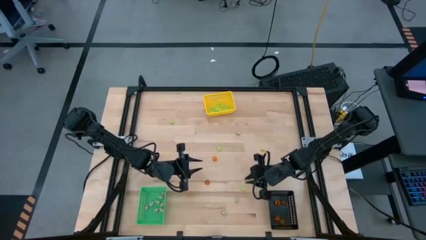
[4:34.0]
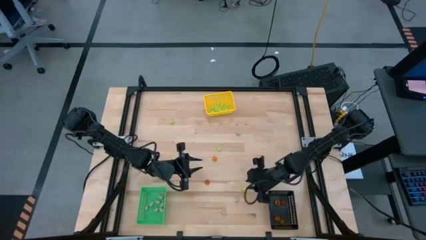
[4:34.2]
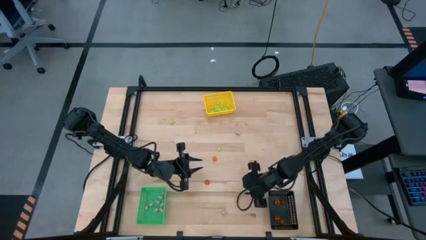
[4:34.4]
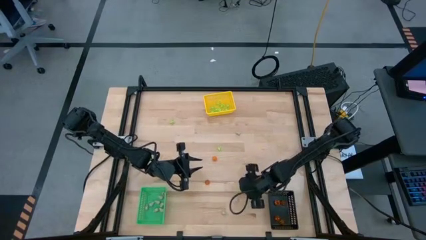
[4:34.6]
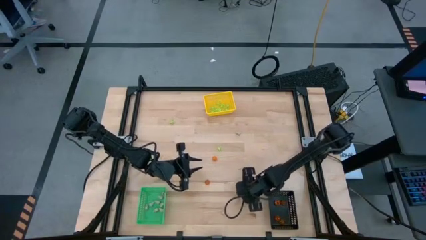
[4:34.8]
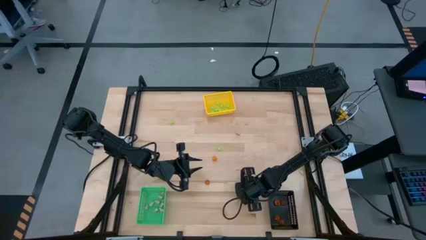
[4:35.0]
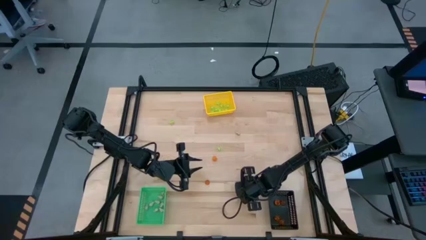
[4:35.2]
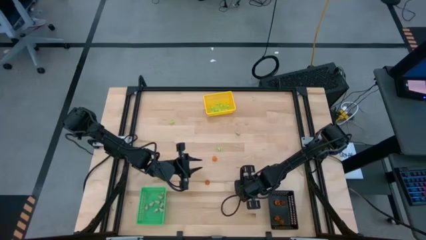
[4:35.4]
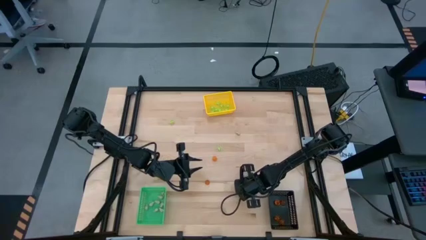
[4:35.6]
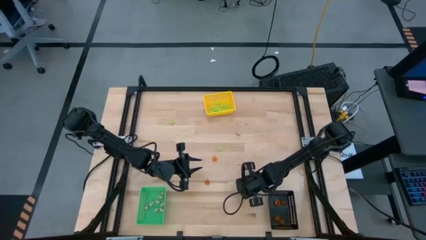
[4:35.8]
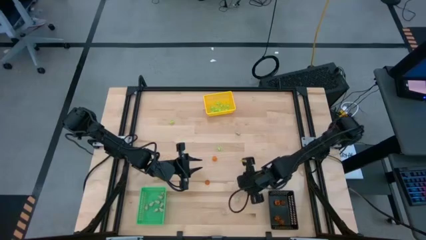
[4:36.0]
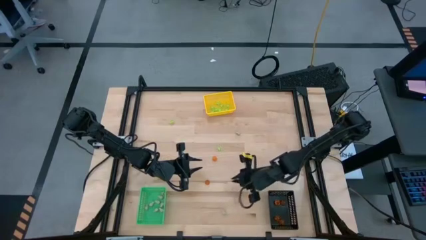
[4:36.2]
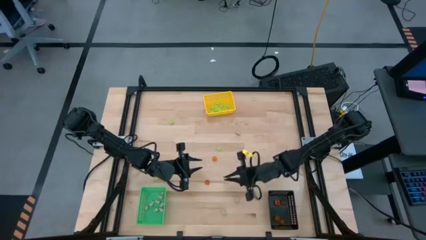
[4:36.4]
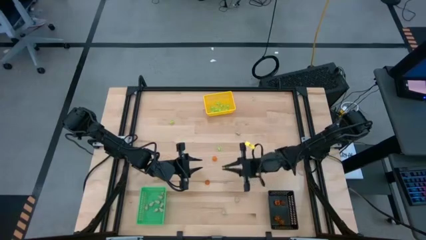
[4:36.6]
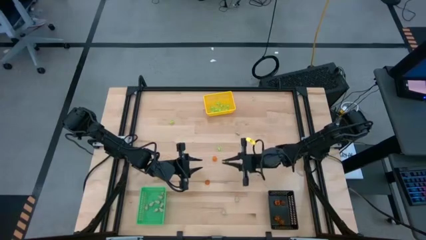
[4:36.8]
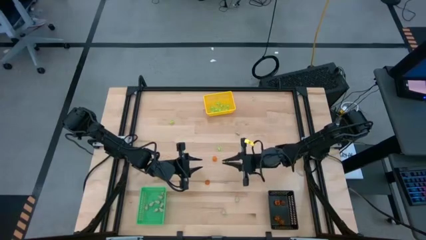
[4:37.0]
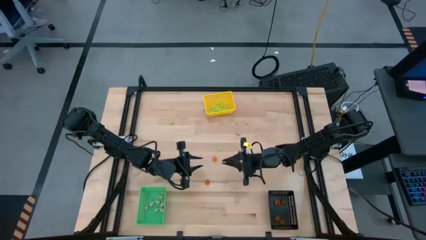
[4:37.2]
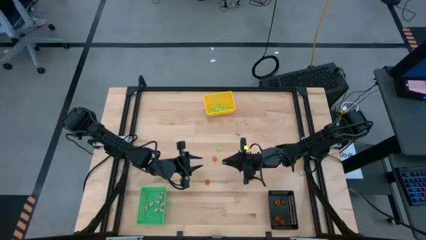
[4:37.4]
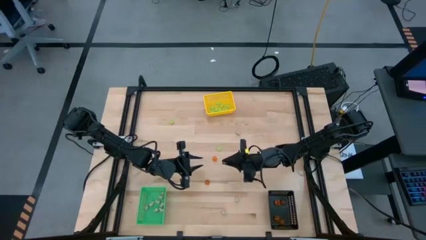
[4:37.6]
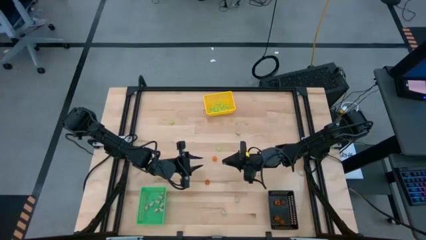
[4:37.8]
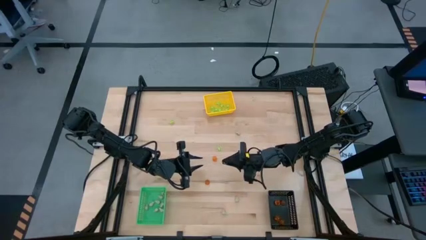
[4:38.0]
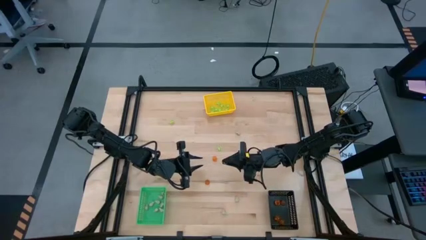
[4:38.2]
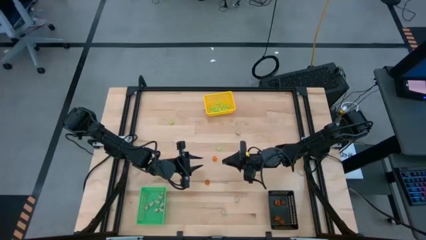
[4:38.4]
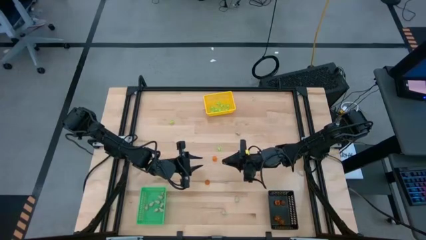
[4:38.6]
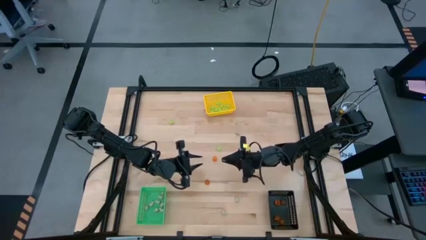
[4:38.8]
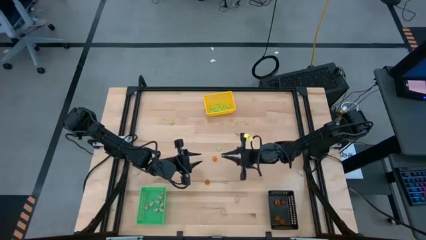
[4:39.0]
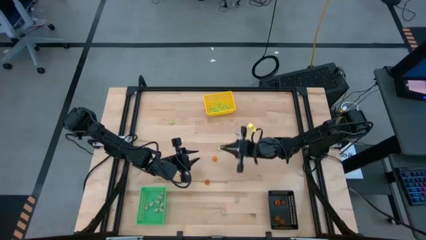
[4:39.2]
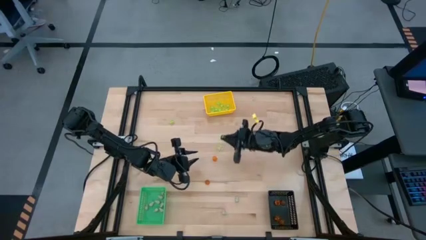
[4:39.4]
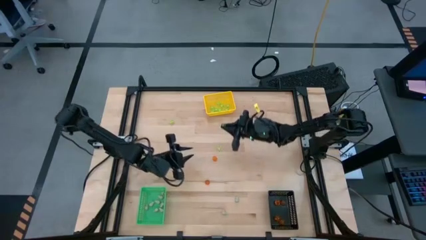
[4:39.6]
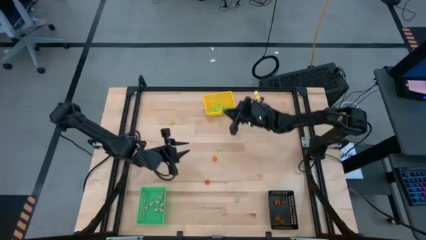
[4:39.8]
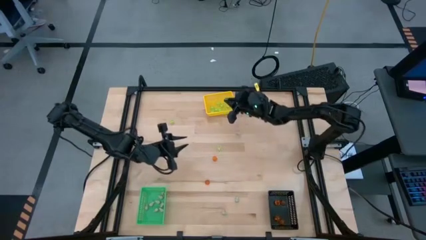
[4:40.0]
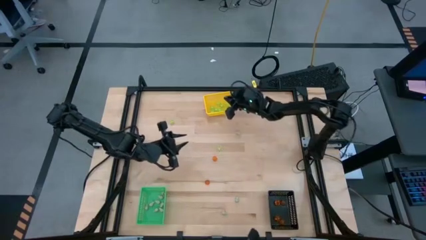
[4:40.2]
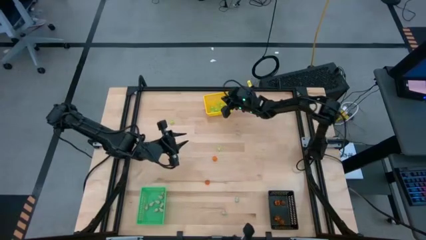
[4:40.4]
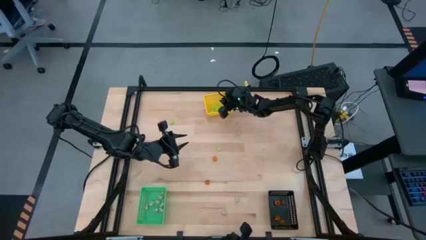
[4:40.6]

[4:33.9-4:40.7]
Task: Sort Halloween decoration
Put the green spider toy into the yellow bin

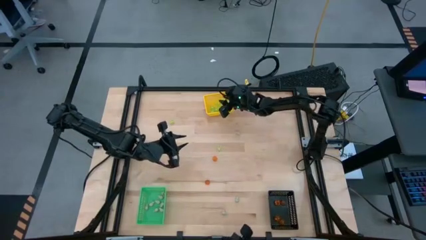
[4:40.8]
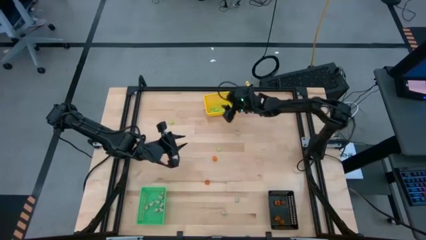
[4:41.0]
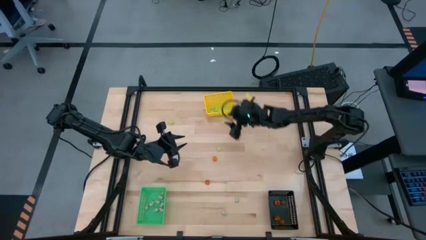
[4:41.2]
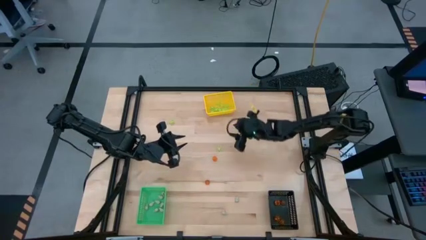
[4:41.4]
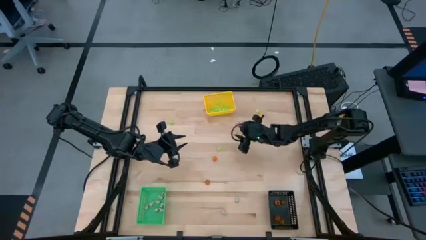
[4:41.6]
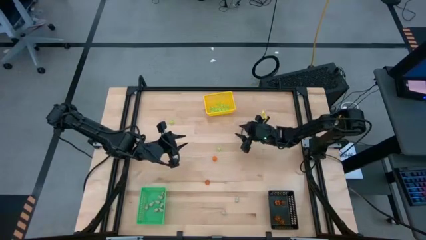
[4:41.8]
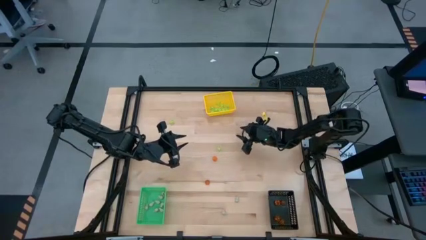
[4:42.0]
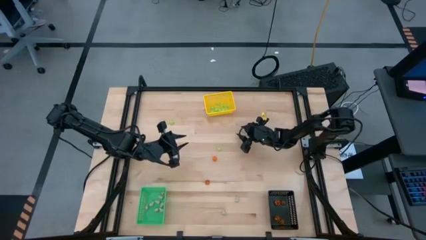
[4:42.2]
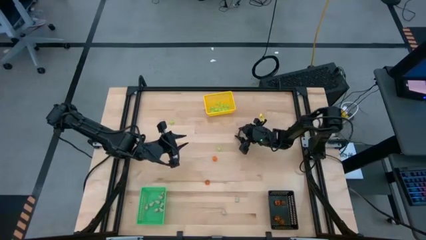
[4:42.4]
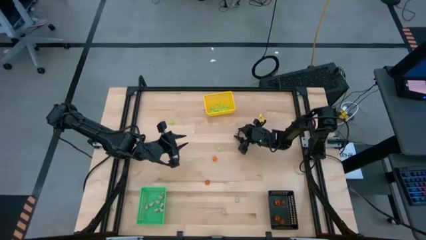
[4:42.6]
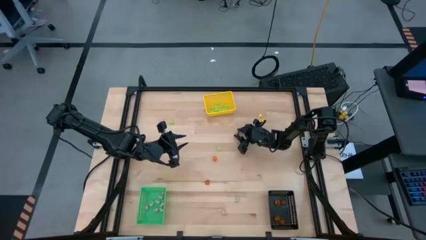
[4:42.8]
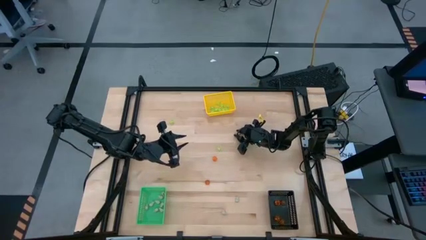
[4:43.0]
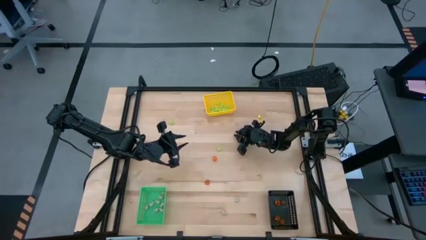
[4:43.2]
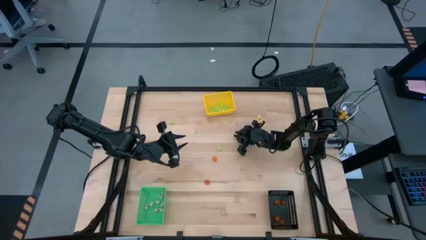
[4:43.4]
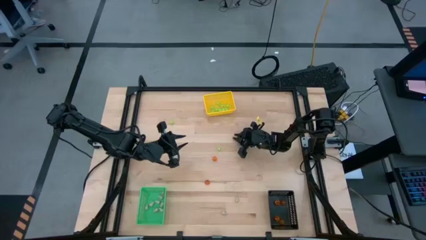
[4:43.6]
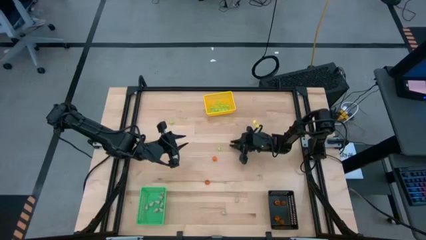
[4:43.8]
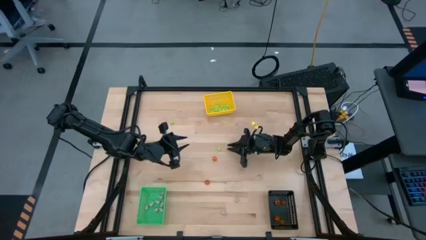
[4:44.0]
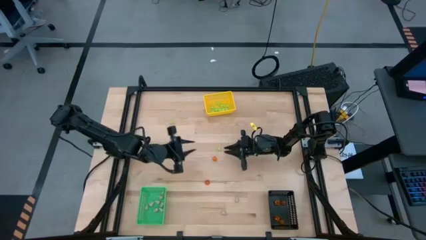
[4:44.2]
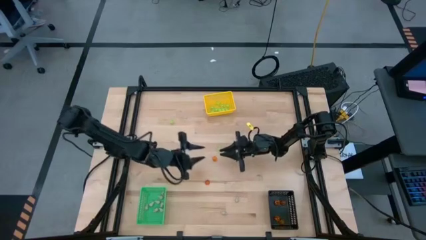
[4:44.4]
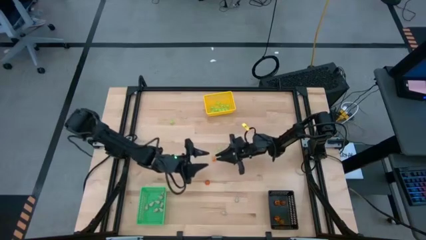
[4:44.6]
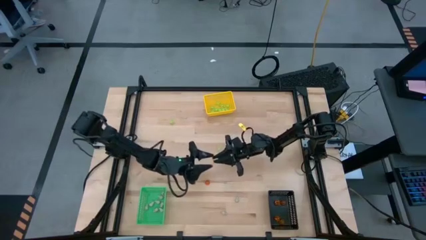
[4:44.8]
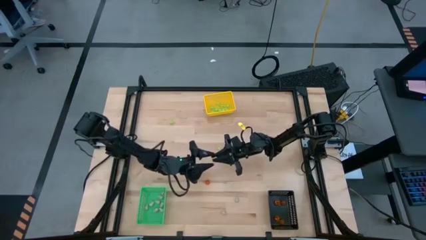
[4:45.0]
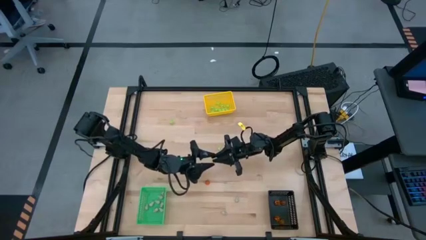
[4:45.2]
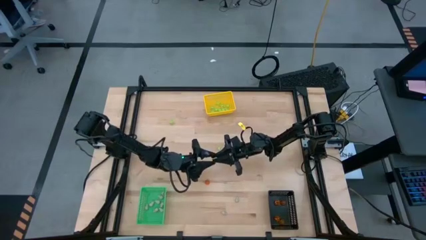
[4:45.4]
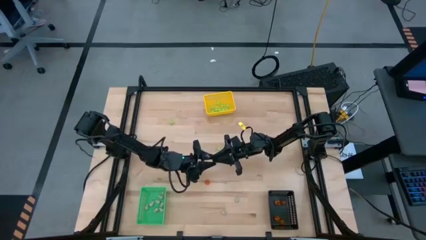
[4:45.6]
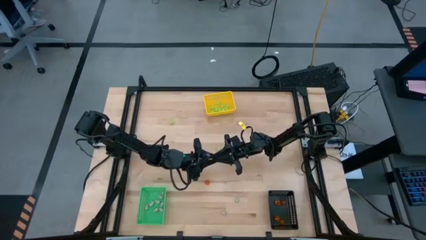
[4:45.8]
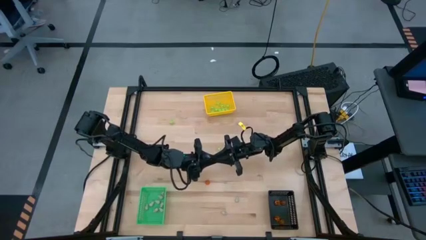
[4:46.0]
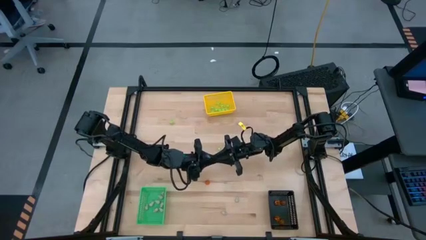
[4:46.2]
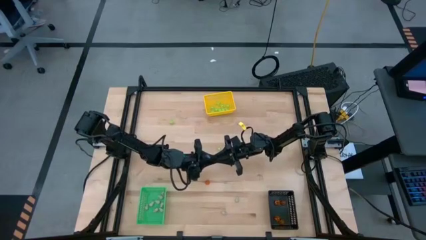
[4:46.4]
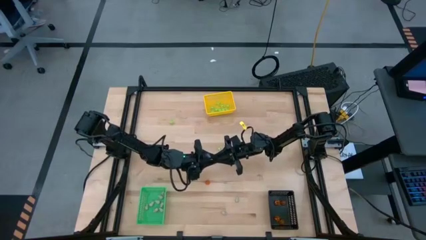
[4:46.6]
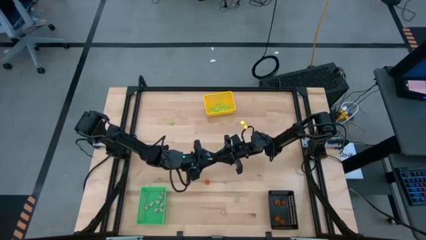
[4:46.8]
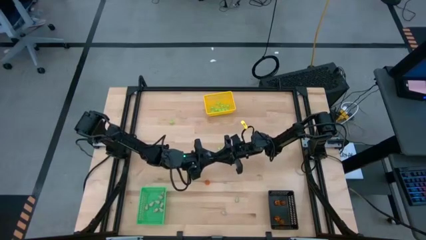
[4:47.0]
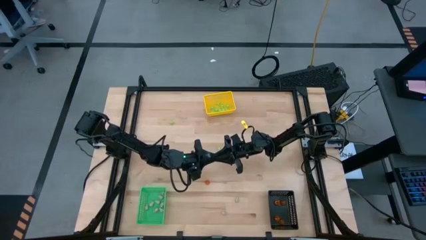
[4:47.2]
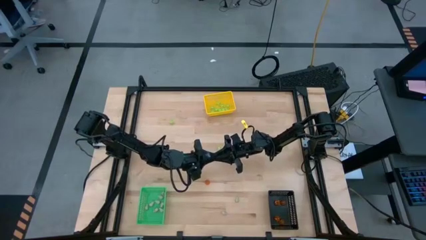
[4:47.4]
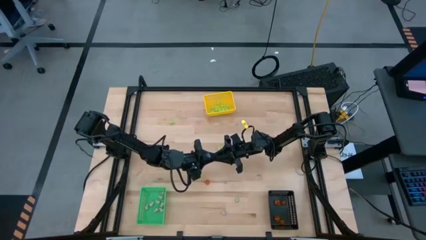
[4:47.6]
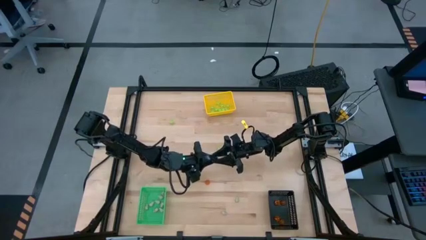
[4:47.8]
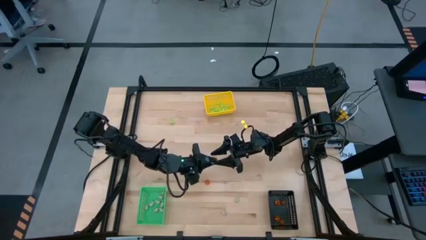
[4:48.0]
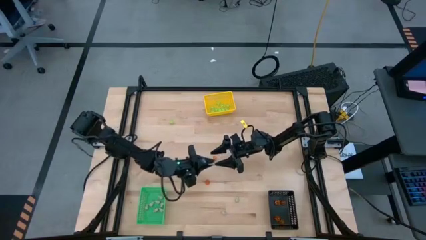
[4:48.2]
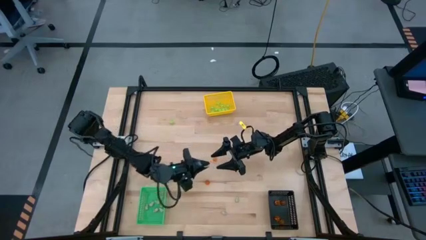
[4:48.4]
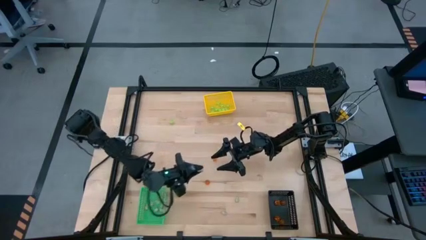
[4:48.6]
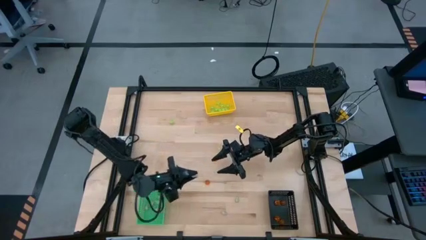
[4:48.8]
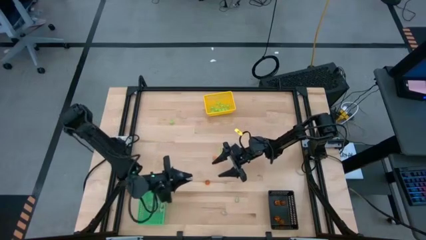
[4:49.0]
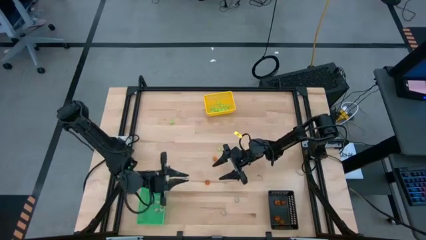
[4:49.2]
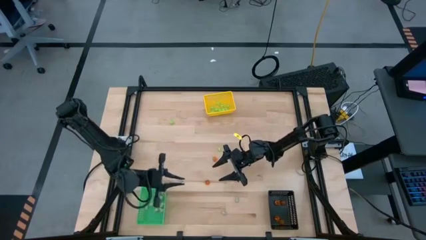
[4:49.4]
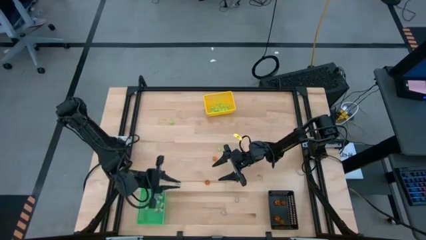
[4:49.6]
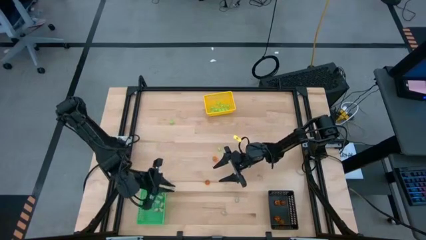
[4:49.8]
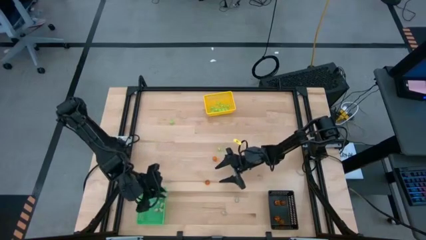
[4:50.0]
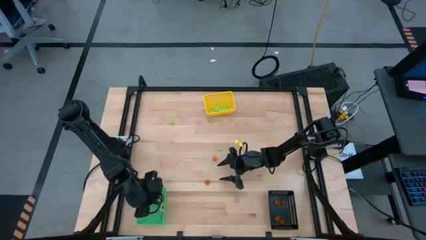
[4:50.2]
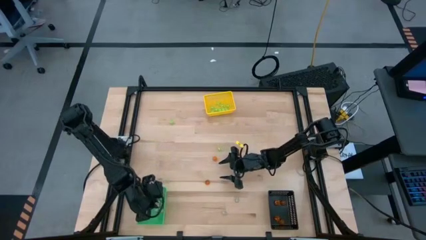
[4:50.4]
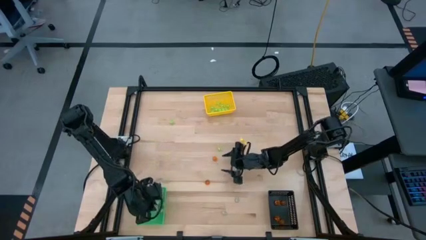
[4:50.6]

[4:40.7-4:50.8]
Put the white skull toy into the green bin
